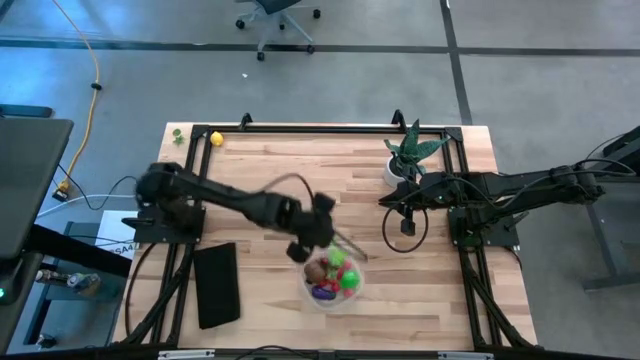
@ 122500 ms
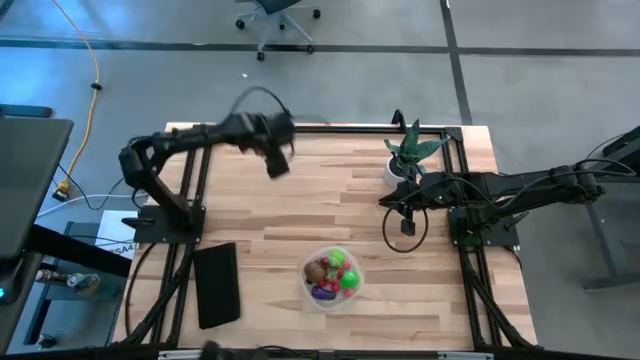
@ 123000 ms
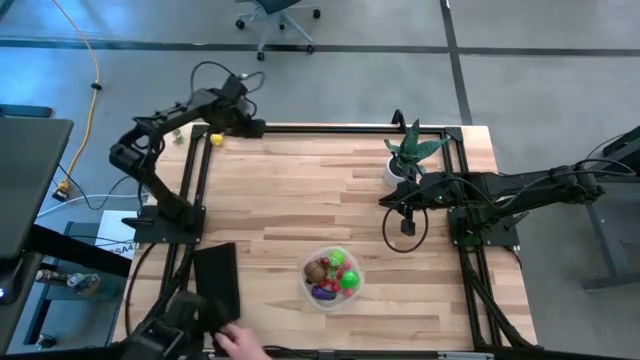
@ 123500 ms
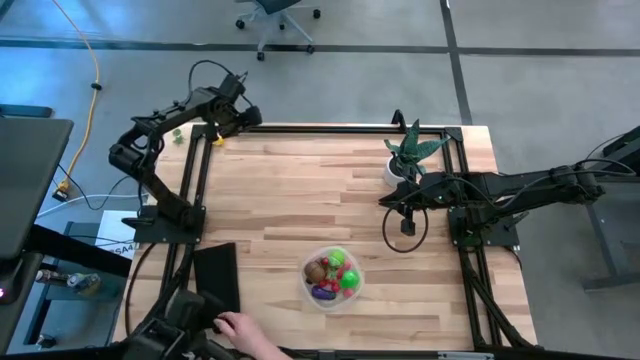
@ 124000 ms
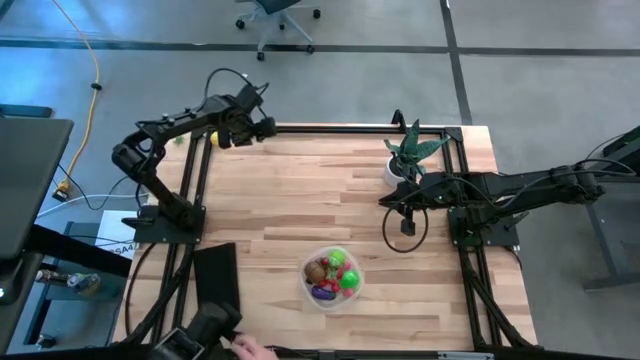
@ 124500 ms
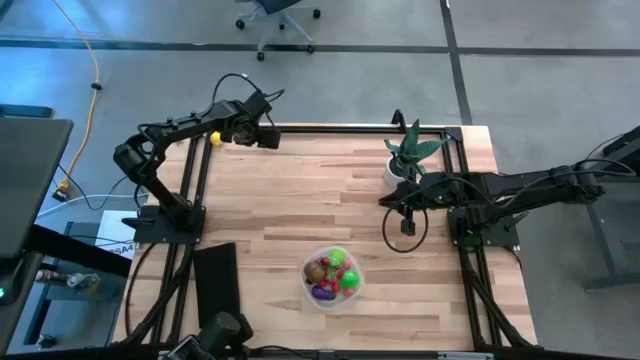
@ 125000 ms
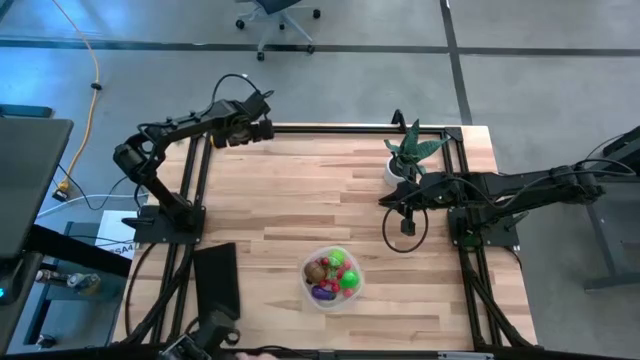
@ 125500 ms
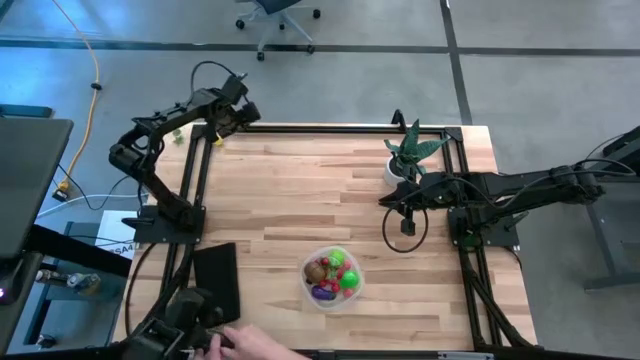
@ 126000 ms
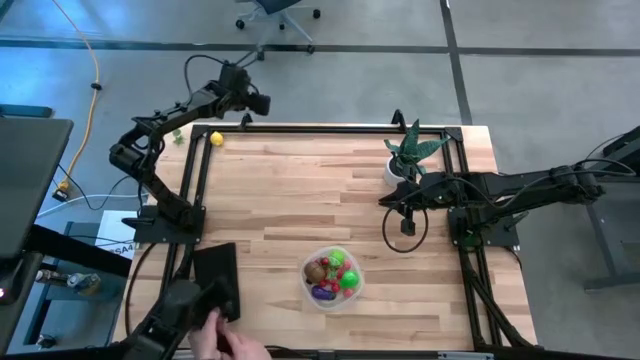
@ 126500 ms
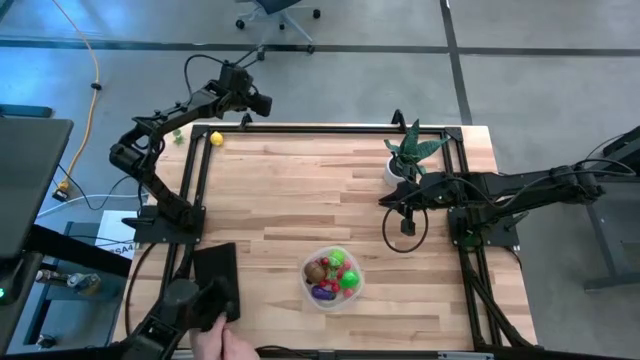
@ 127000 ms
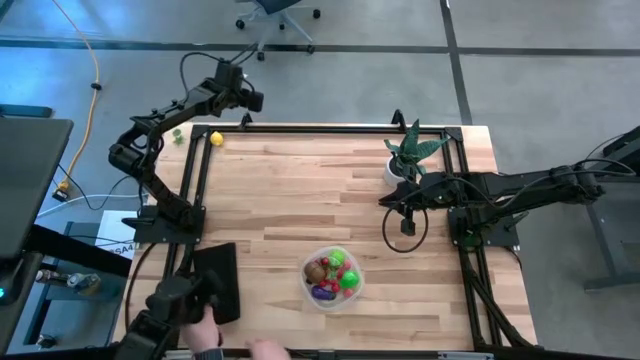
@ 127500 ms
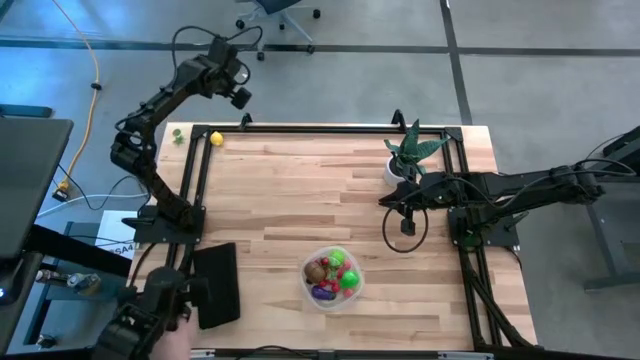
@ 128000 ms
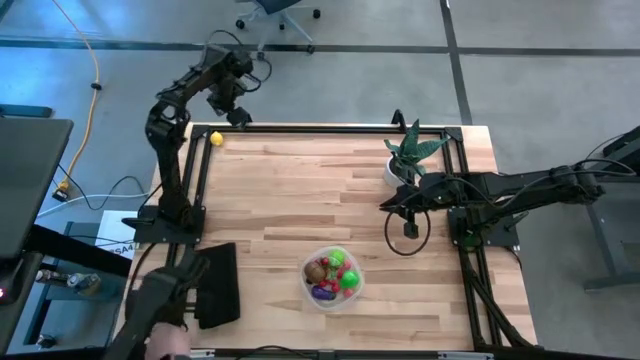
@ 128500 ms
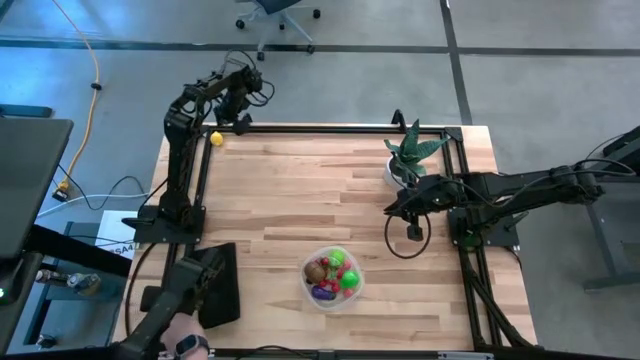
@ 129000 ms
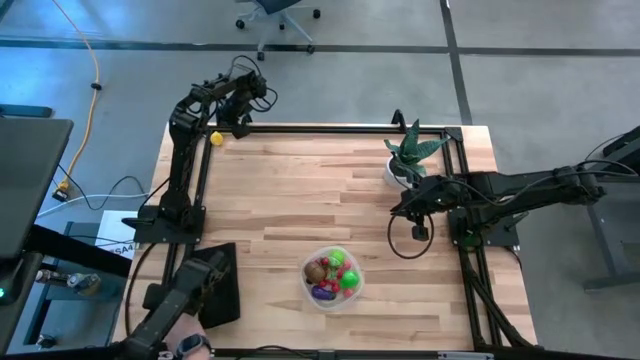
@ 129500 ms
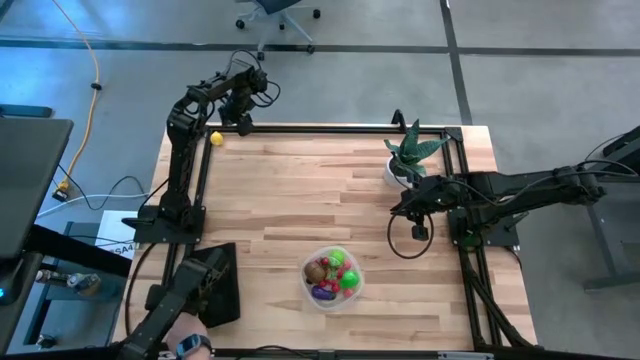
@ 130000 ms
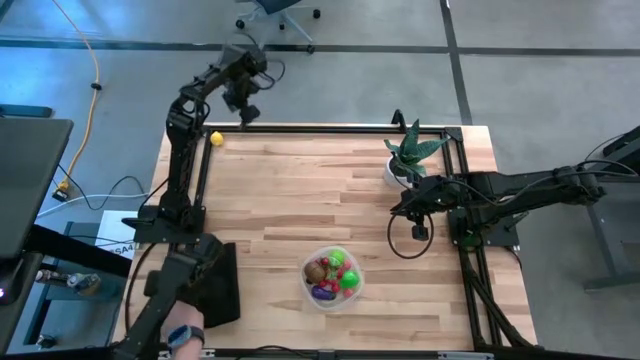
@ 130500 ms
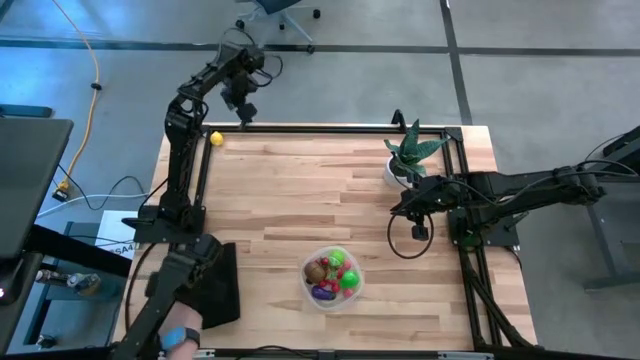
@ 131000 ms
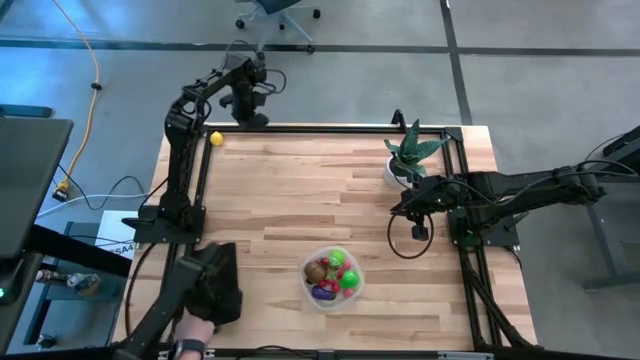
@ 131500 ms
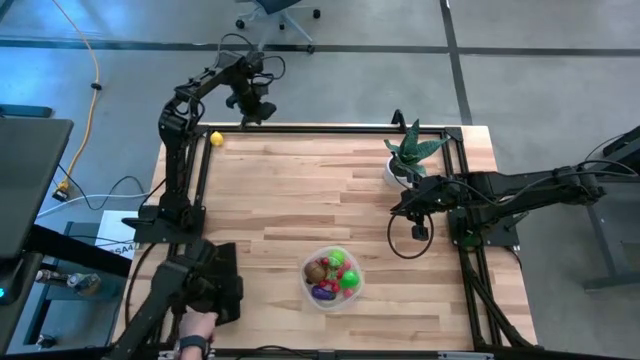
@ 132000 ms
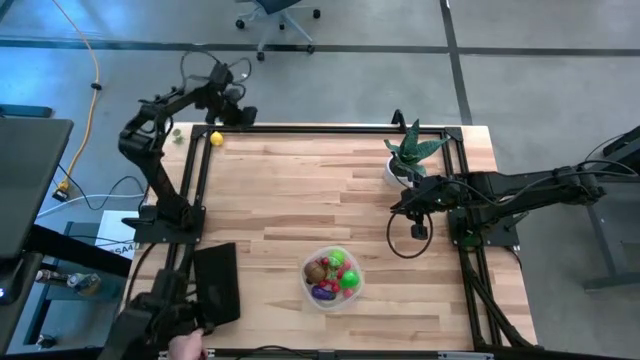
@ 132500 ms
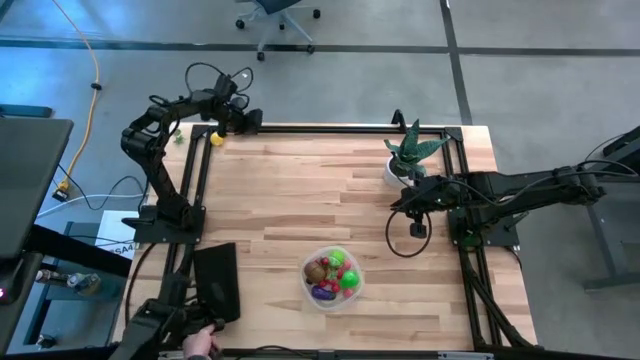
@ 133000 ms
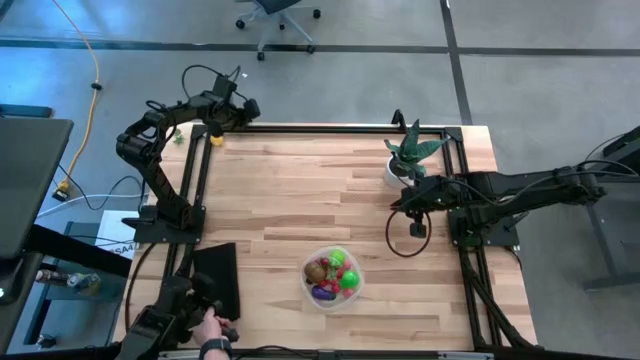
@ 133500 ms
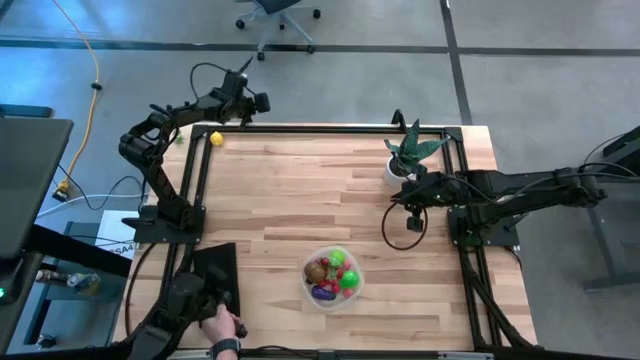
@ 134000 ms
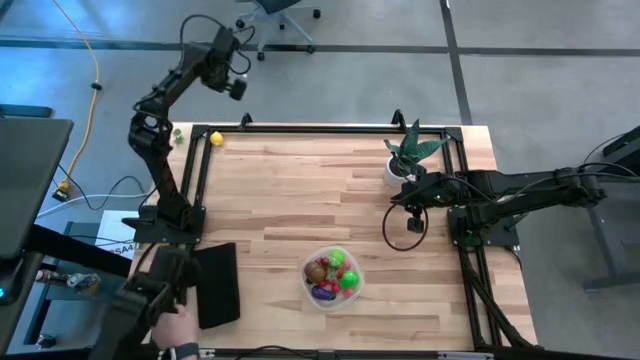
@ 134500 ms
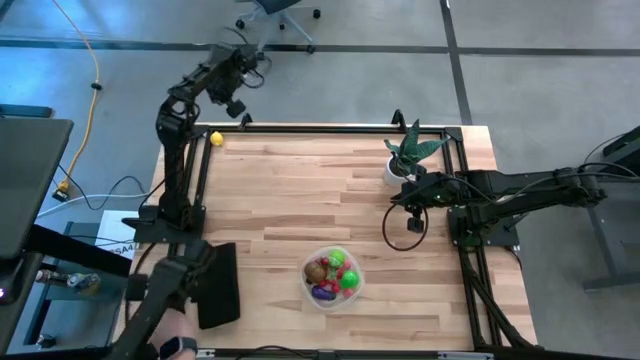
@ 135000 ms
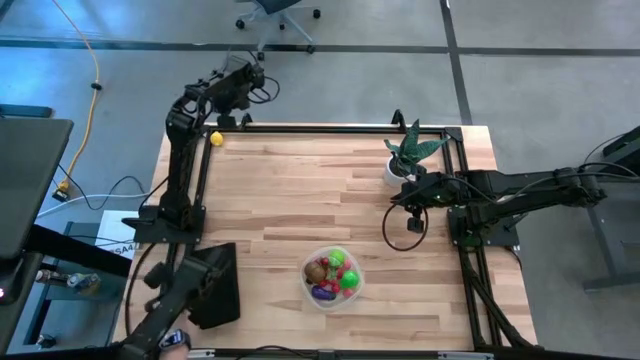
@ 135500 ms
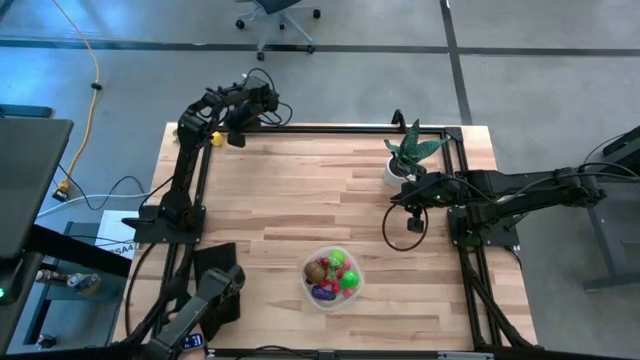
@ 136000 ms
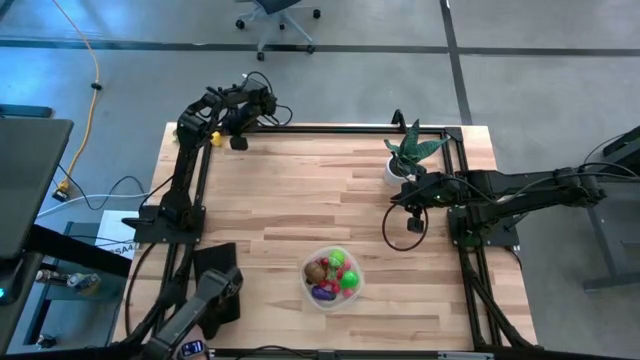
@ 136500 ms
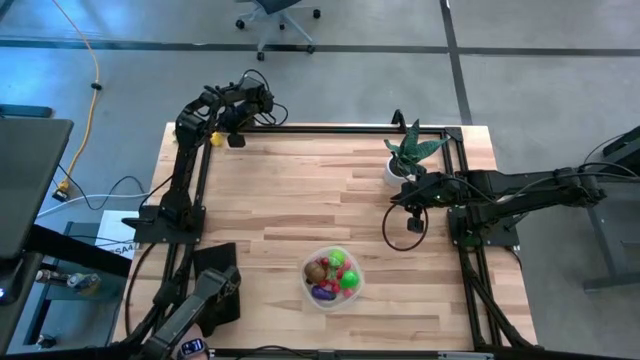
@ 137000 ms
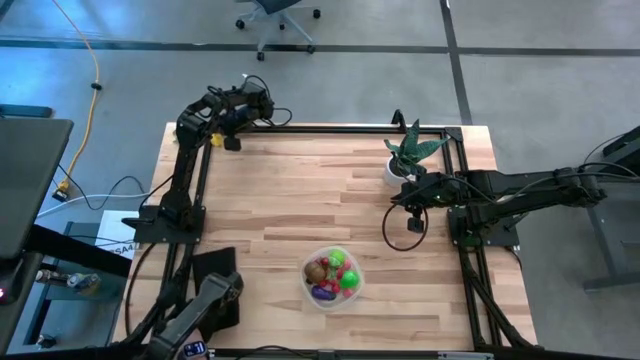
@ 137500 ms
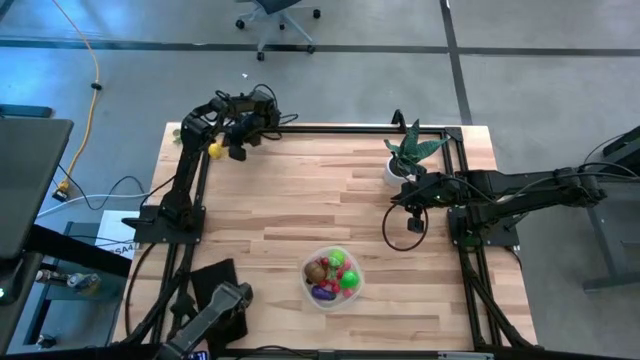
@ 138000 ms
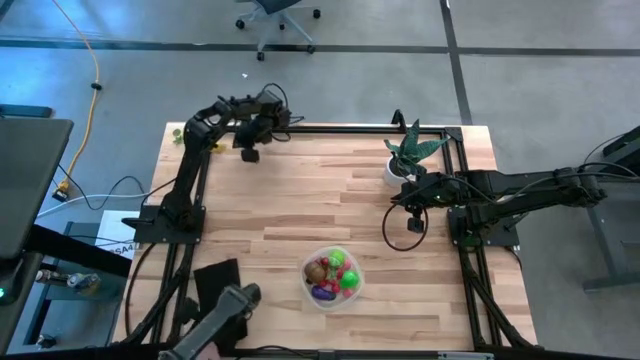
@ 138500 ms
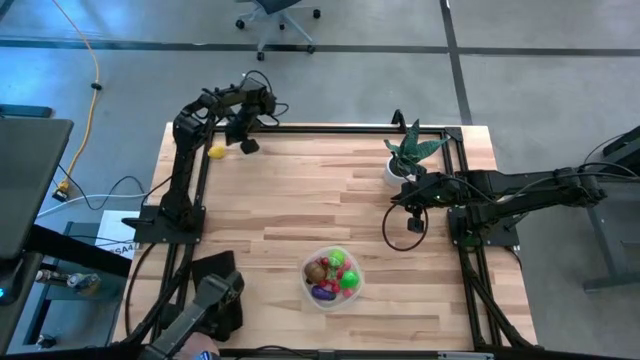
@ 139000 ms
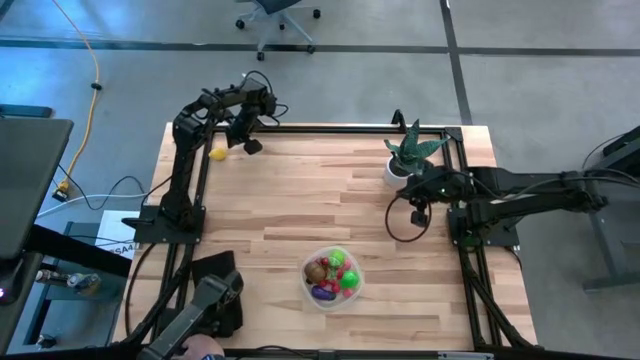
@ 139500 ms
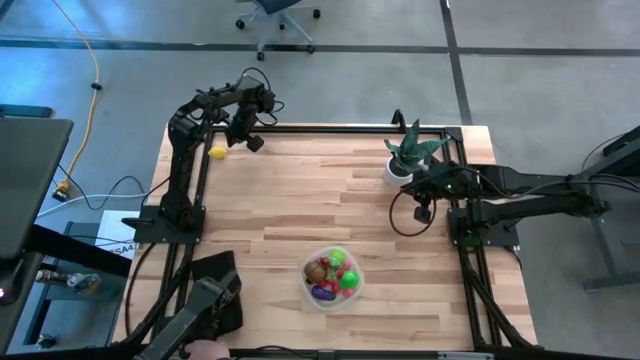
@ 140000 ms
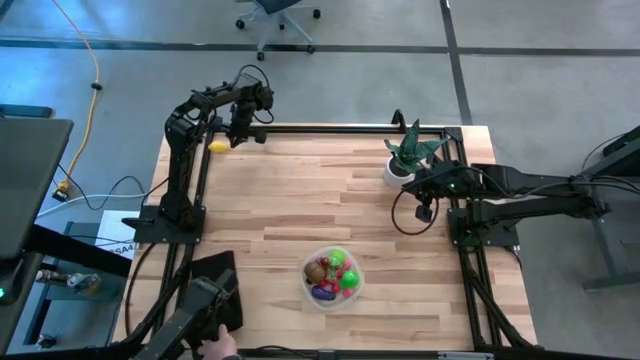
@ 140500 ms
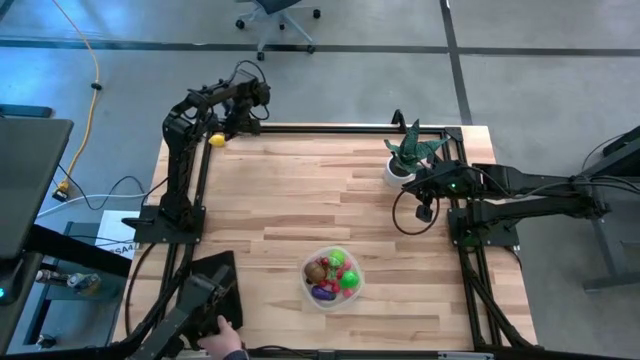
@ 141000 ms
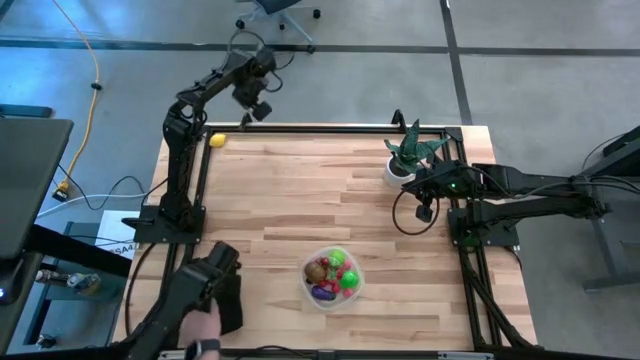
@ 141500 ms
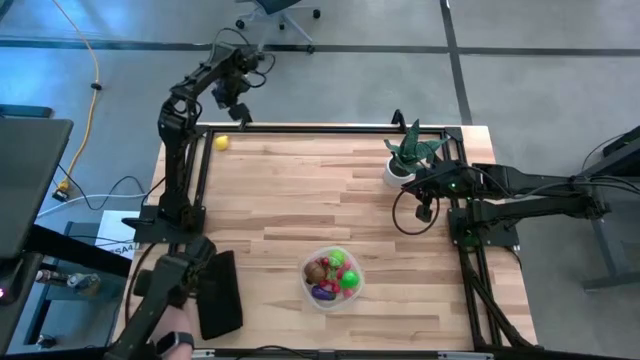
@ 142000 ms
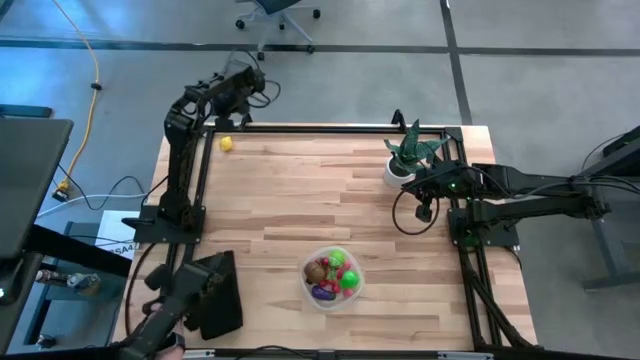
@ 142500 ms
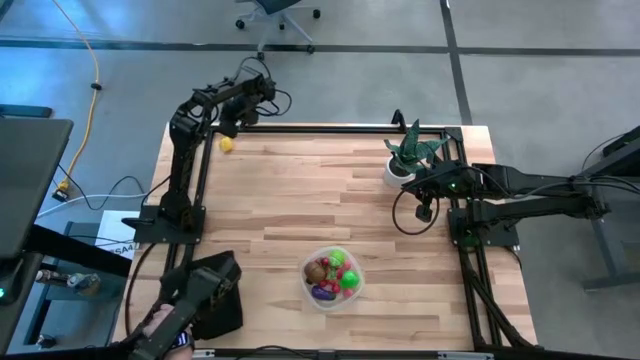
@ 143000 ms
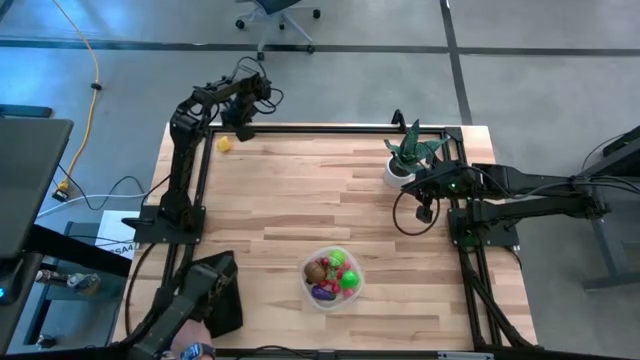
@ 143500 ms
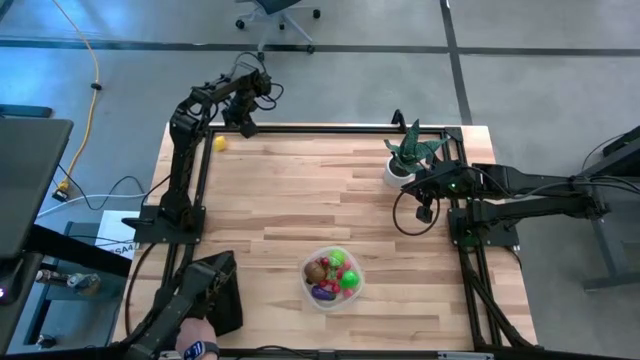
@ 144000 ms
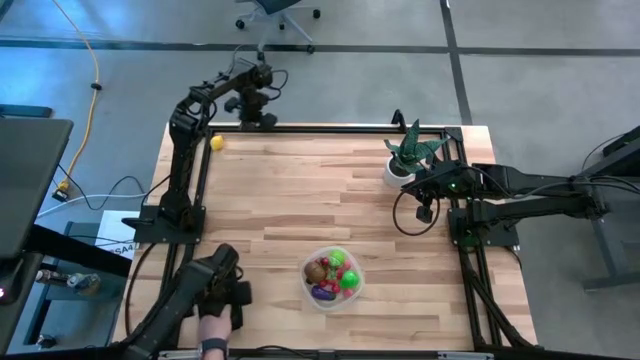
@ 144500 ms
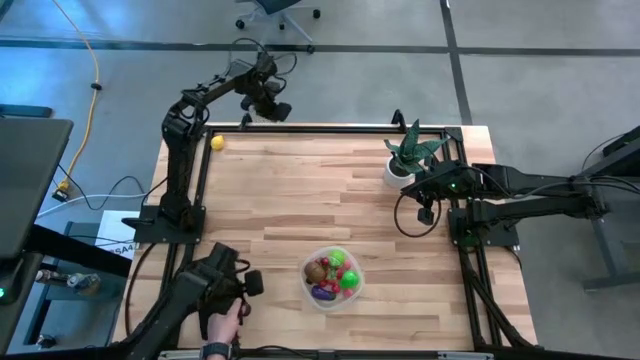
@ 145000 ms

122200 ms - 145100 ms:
Task: Pick and placing Produce into tupperware
Put the yellow lemon into the transparent container
